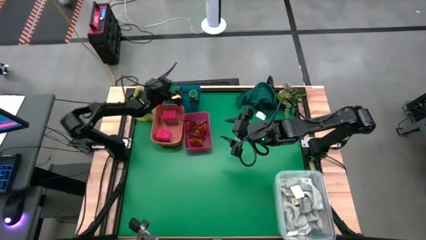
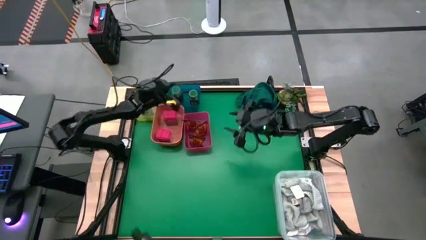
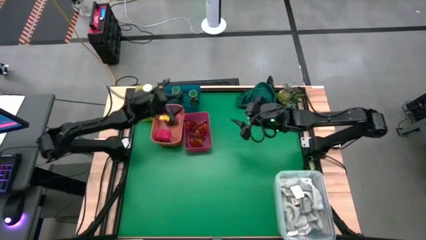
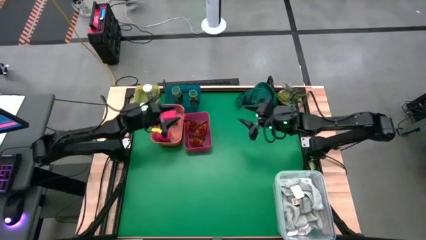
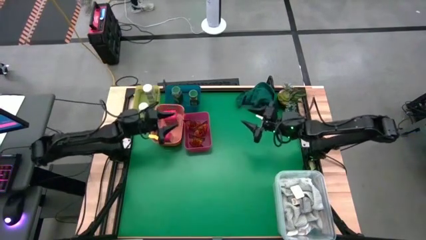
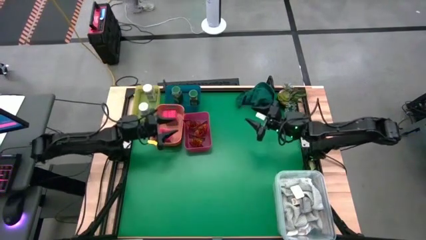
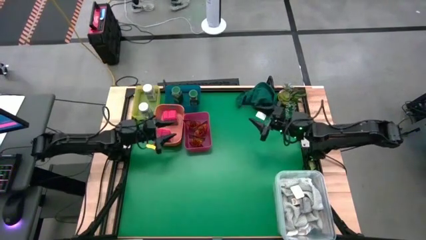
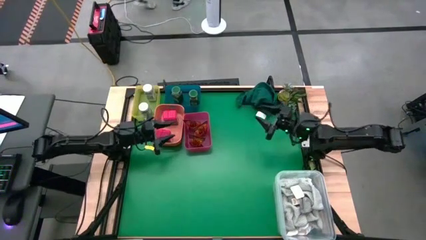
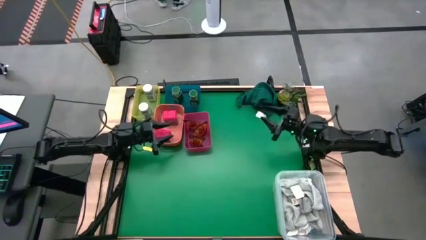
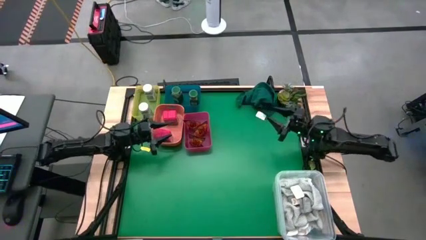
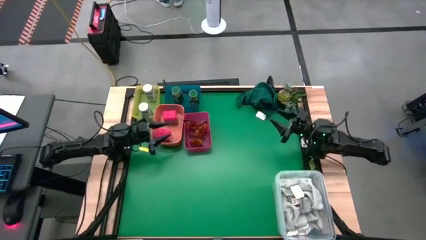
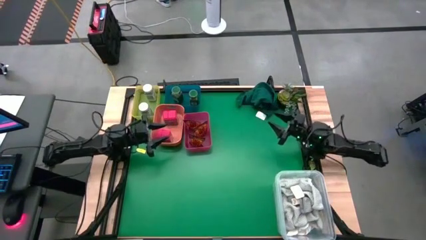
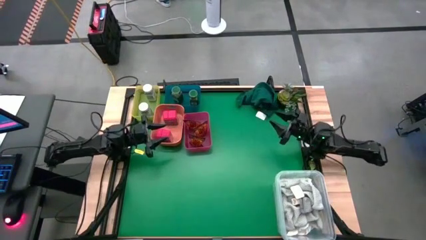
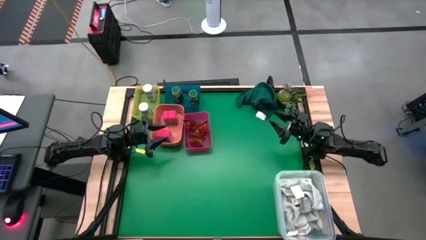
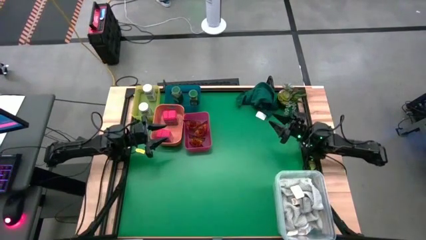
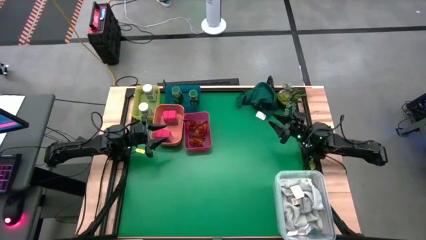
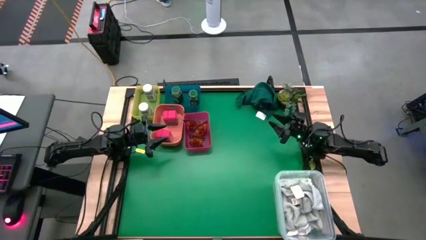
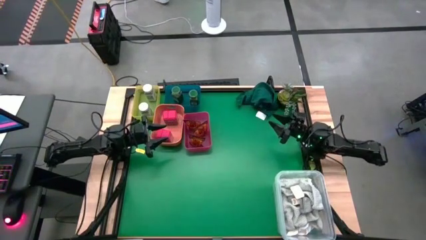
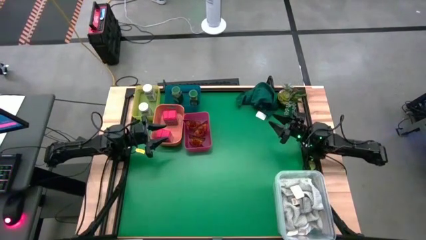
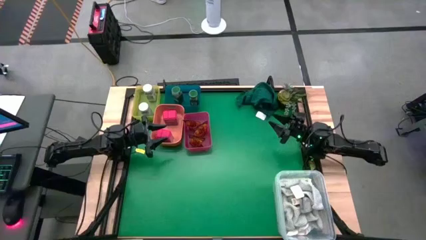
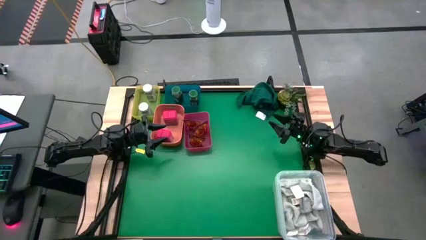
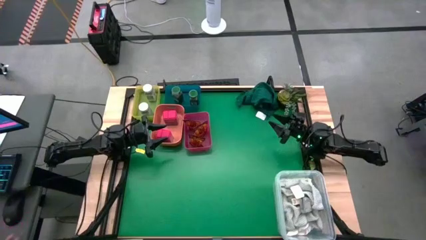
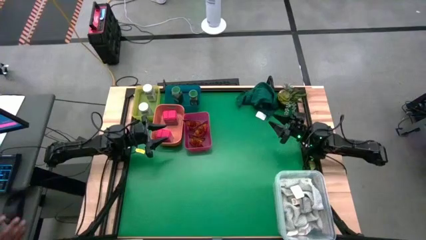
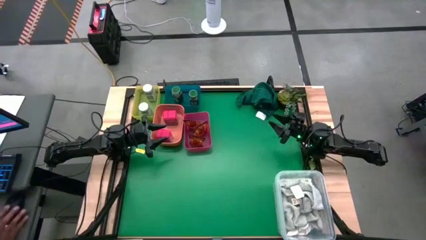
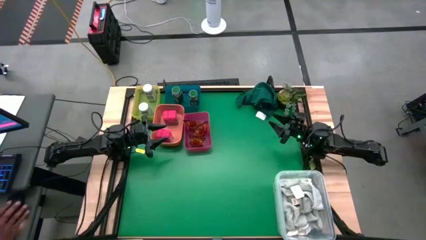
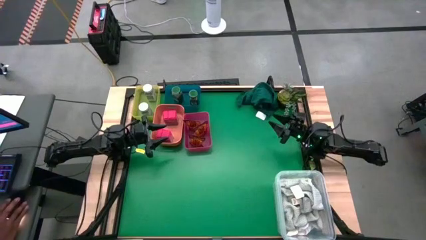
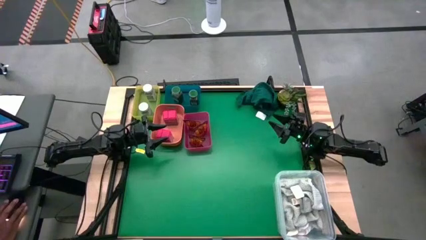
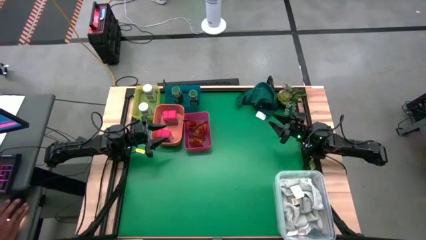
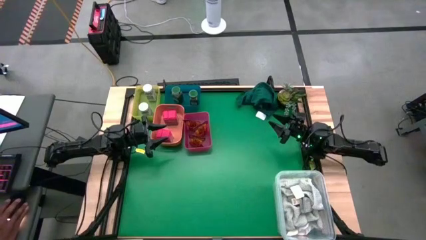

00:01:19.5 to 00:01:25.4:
Task: Sort spices by type
Return to Home Position

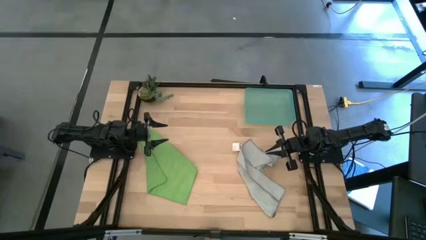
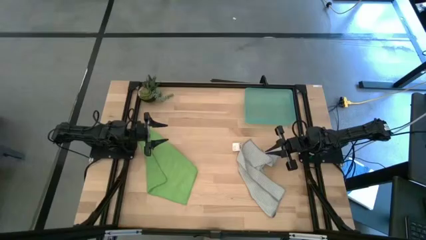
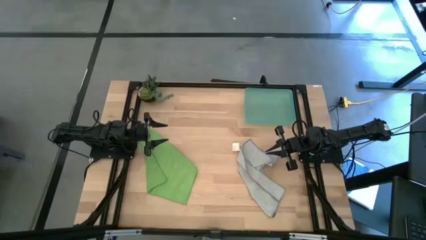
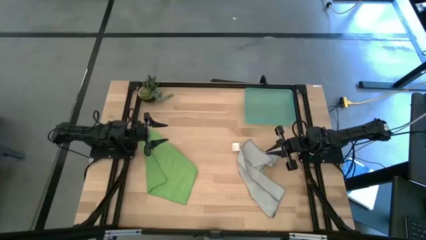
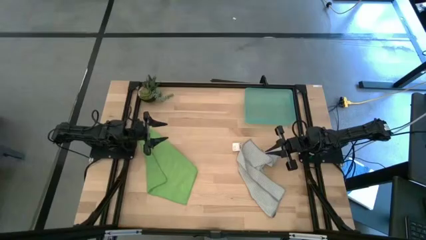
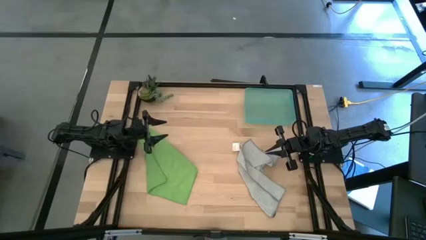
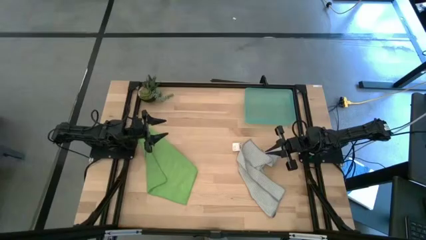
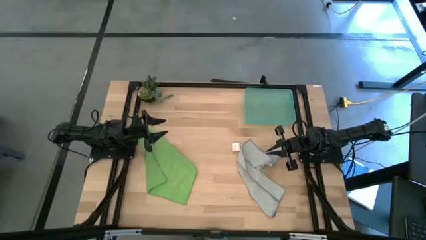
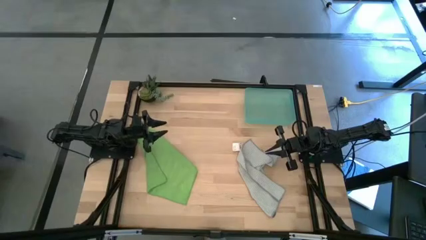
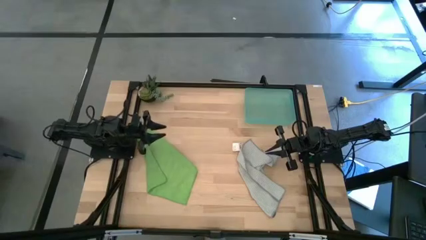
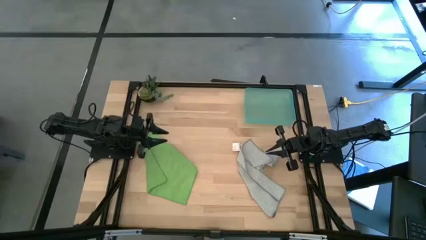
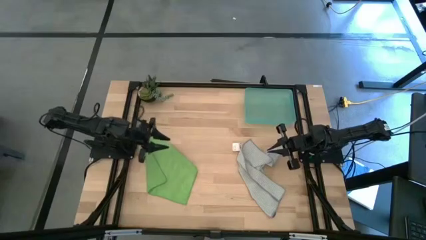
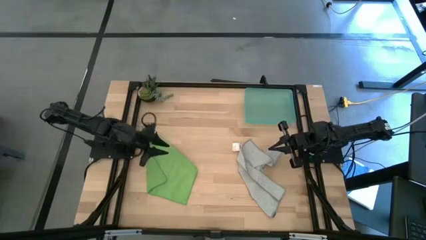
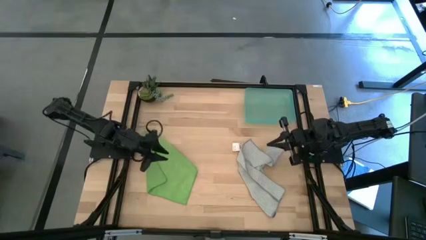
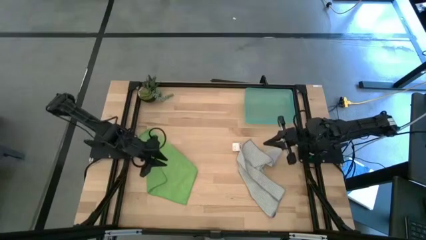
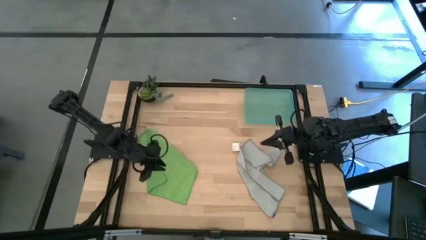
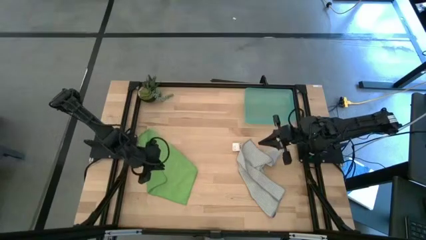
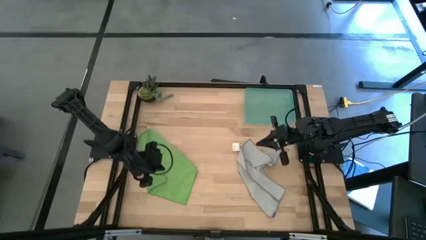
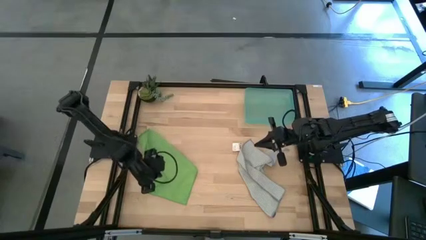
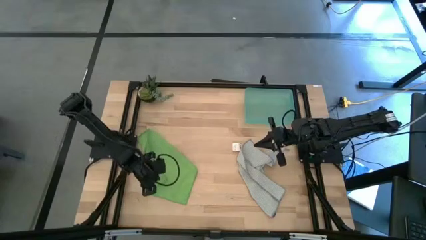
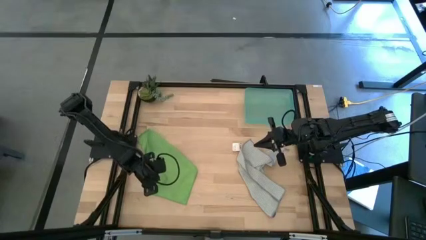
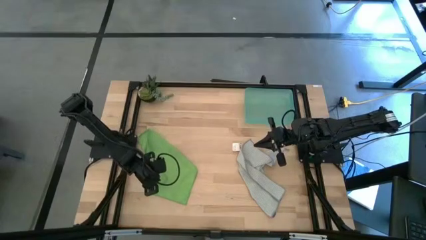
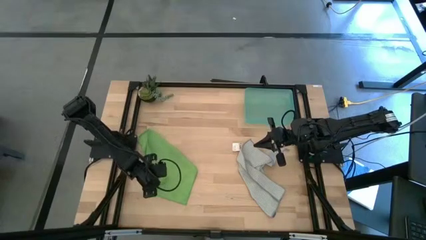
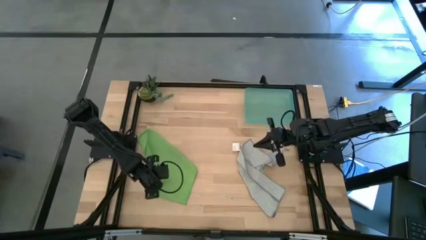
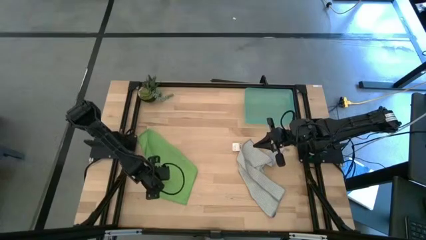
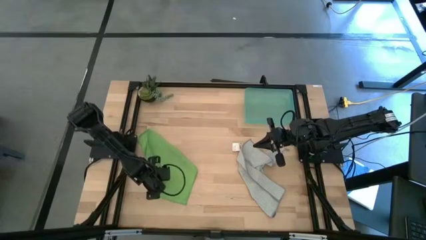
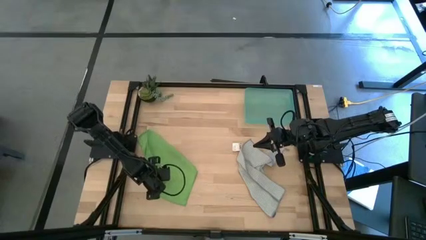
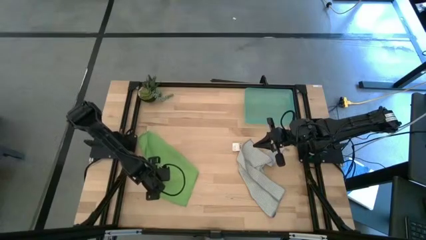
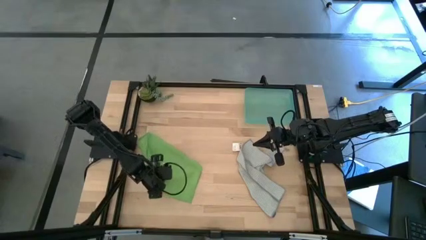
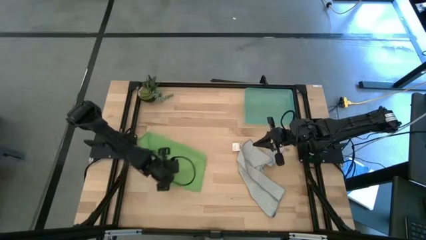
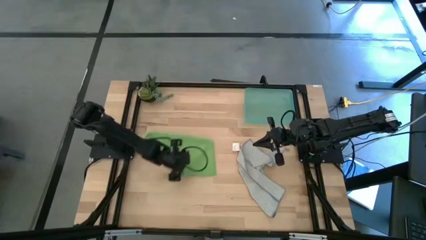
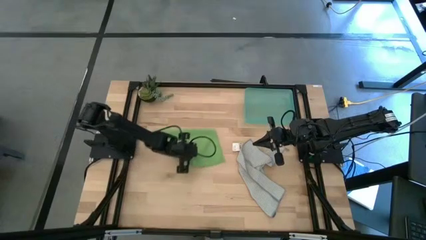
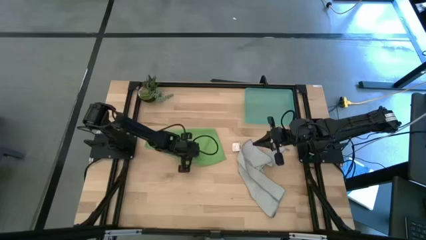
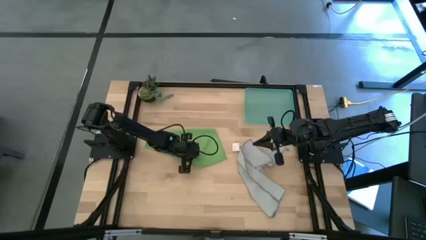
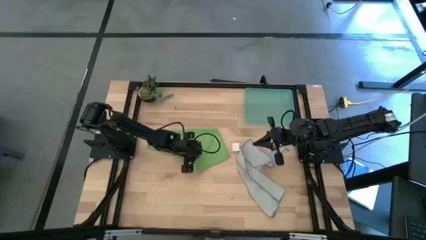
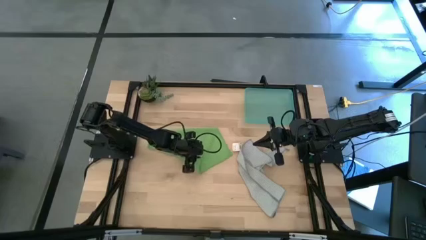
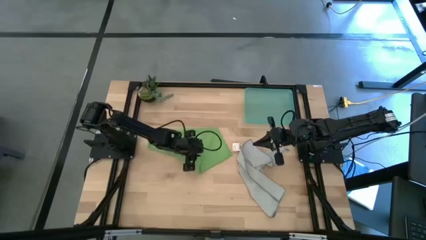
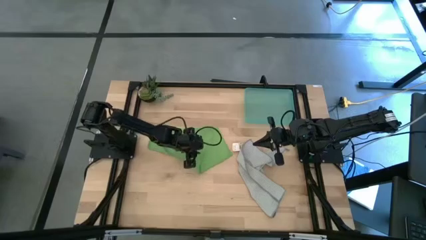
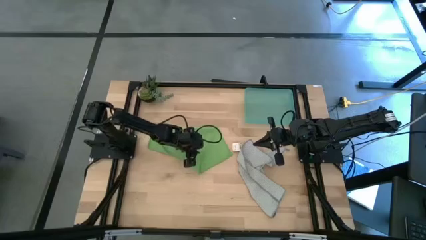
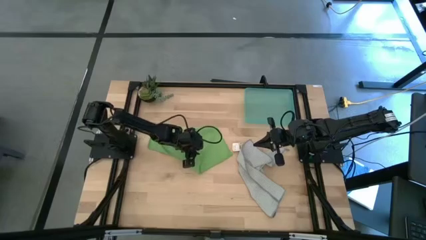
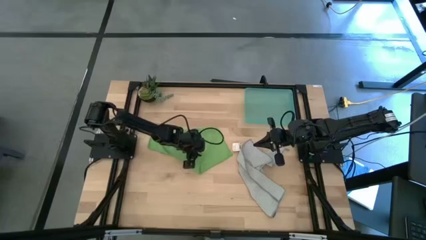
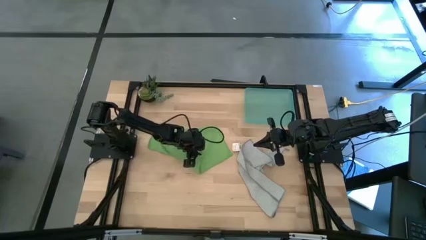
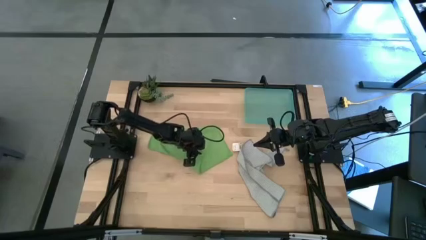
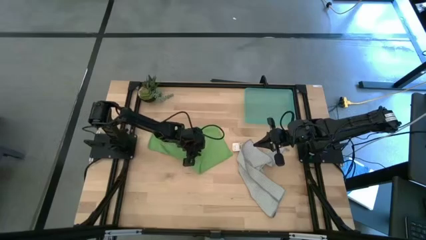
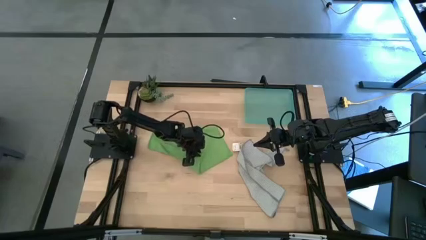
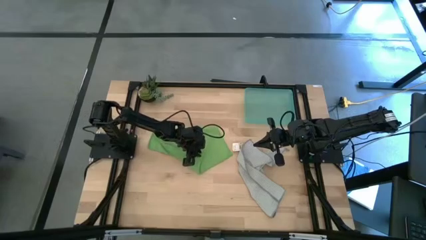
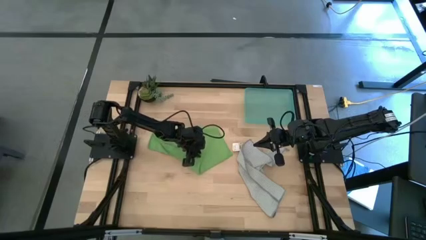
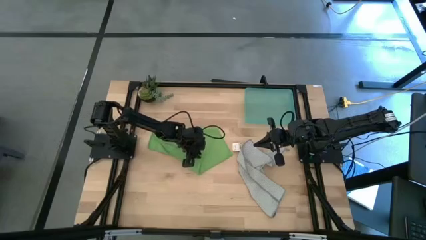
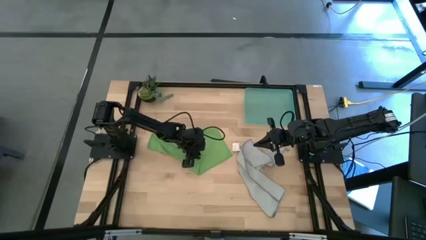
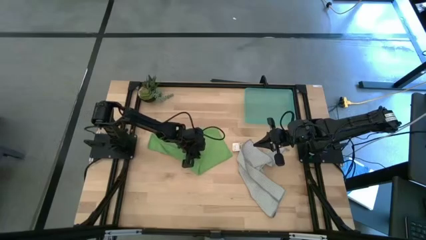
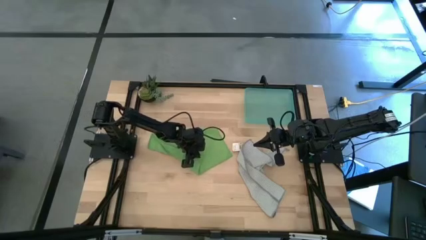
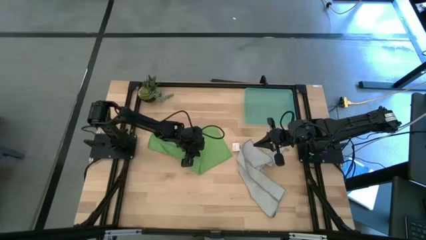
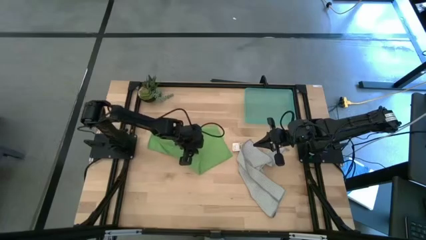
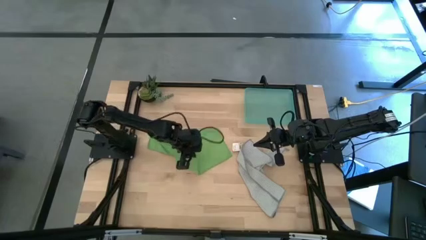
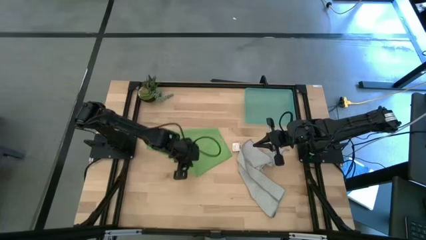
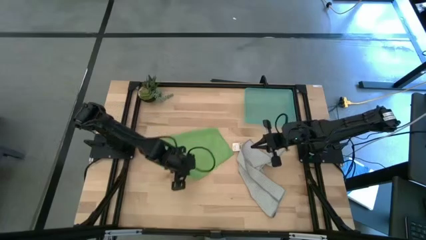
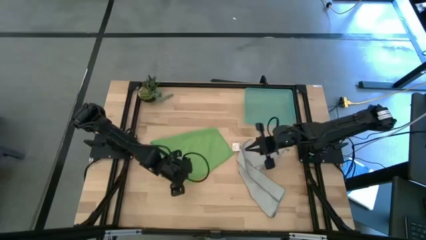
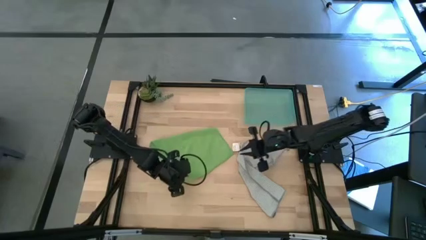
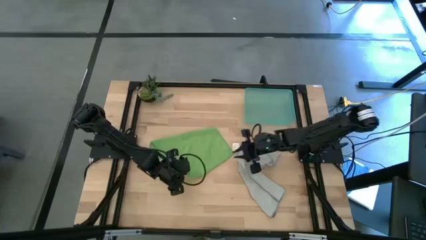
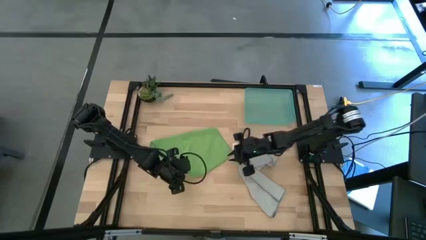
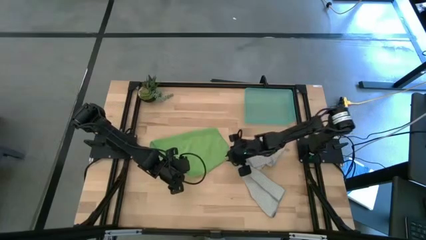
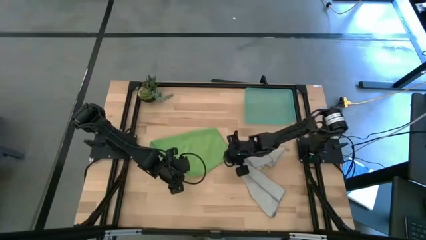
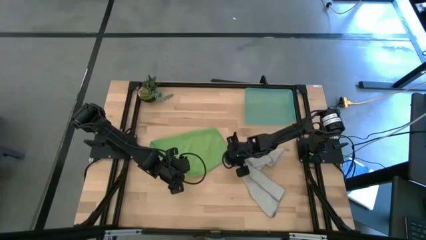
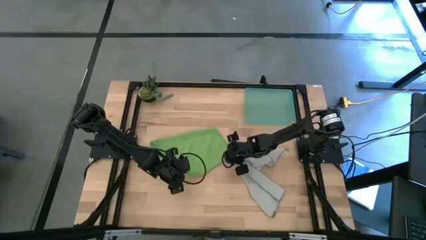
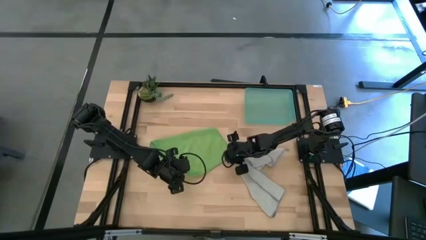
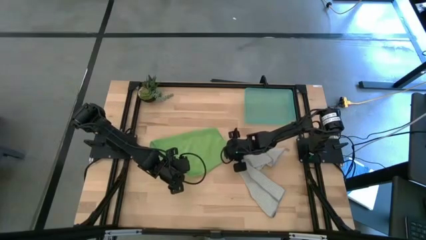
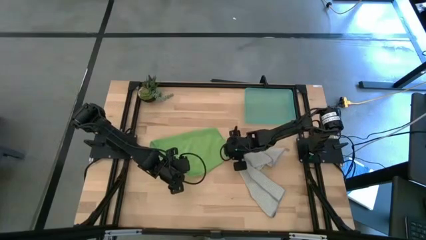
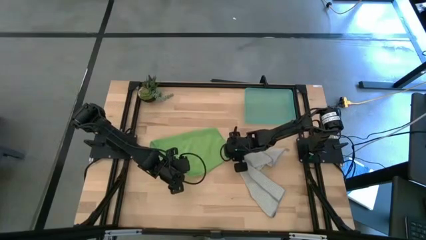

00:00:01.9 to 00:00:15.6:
Task: Roll microfiber towels into tight, uniform cylinder then place into a basket
Fold the green microfiber towel
